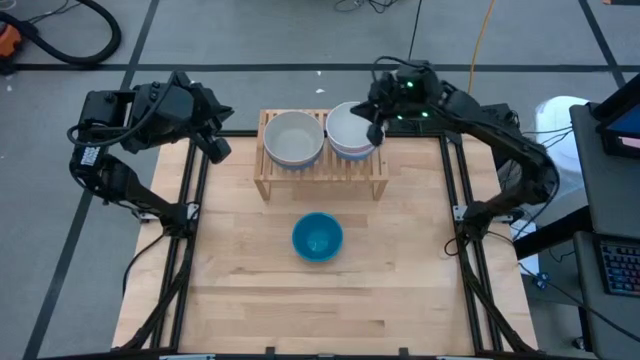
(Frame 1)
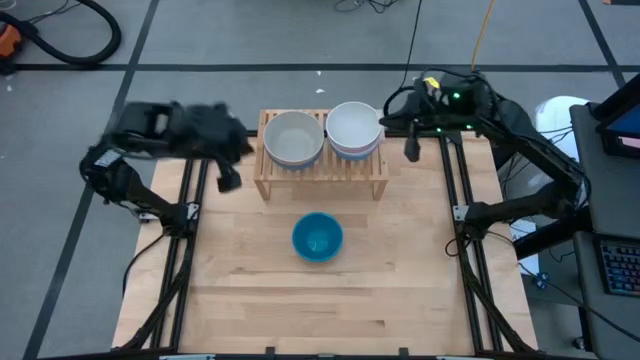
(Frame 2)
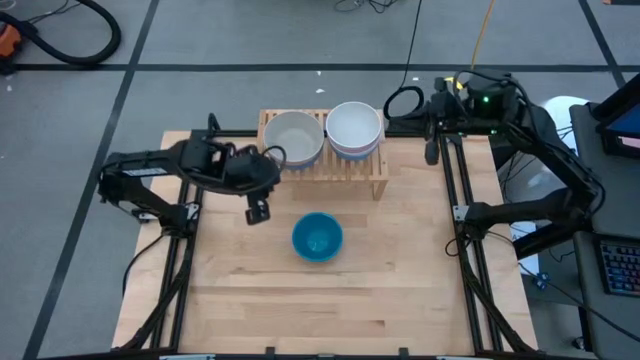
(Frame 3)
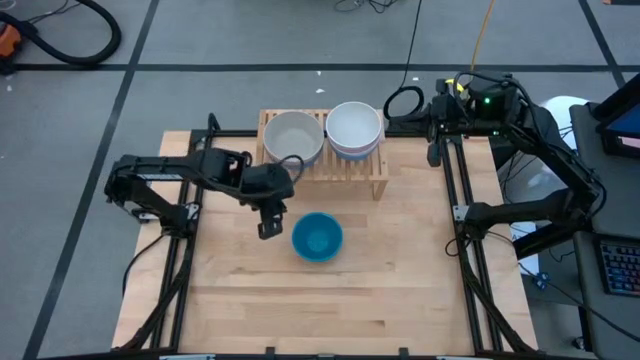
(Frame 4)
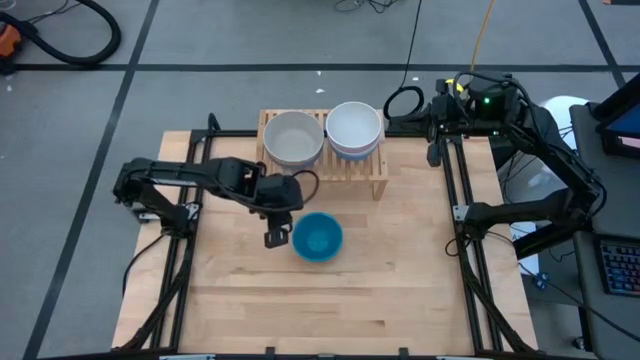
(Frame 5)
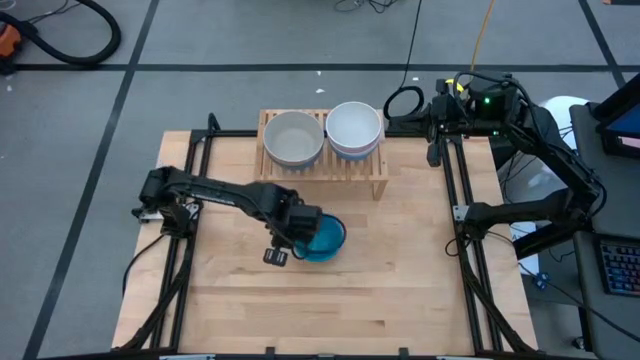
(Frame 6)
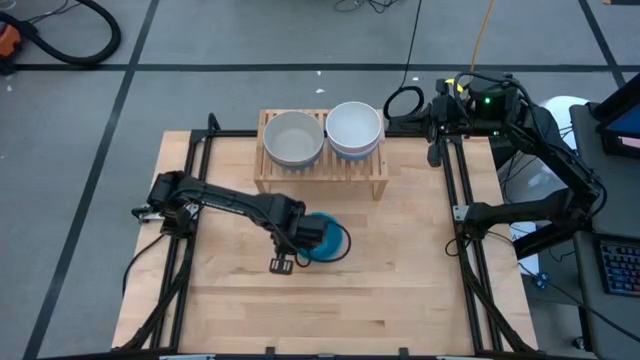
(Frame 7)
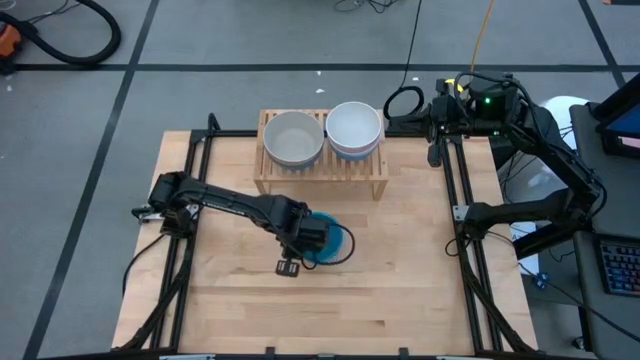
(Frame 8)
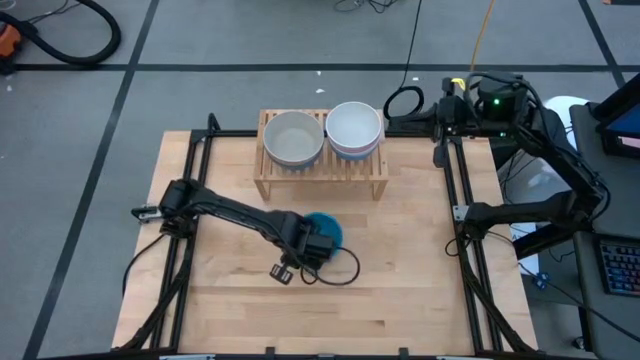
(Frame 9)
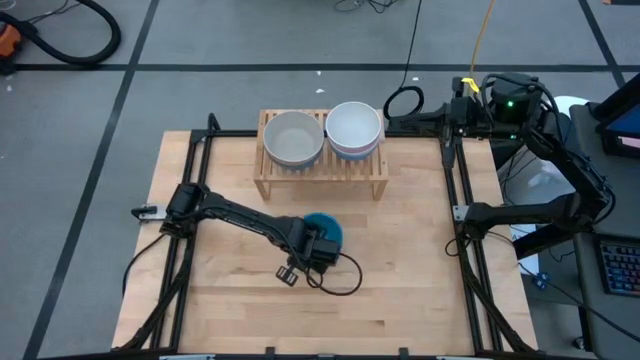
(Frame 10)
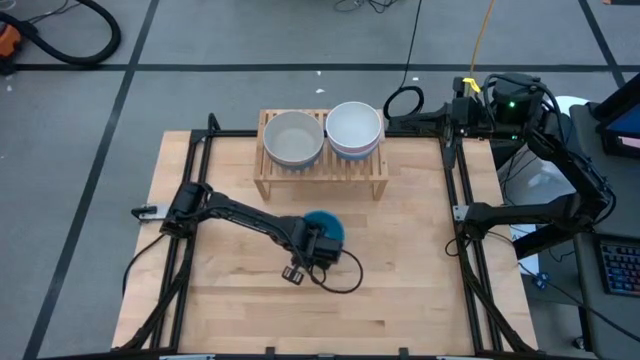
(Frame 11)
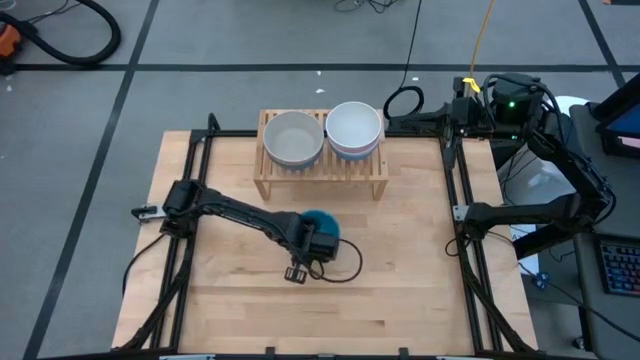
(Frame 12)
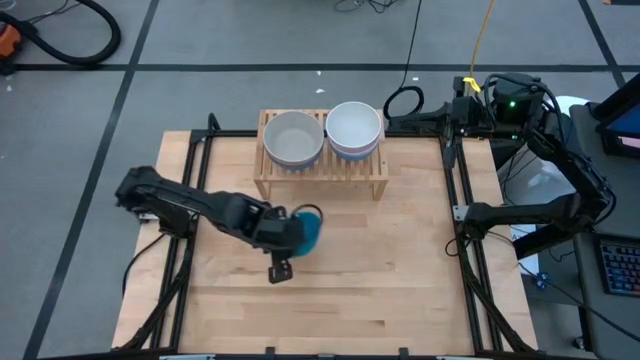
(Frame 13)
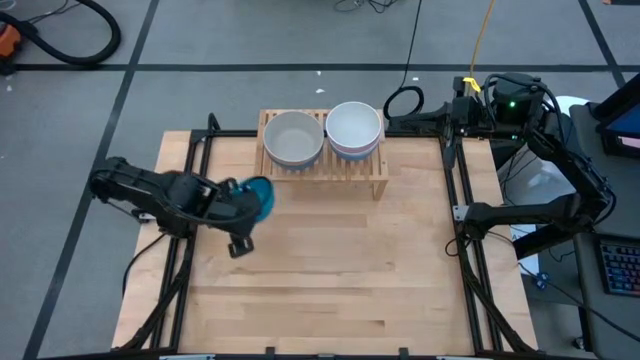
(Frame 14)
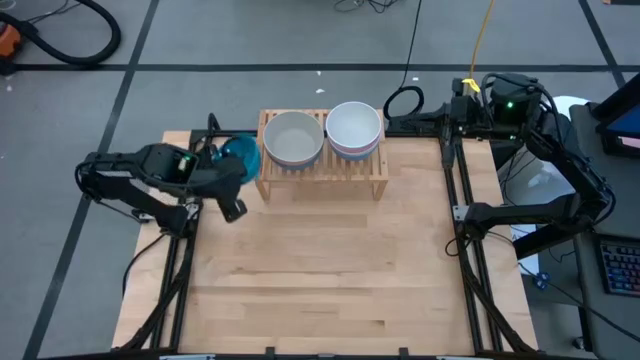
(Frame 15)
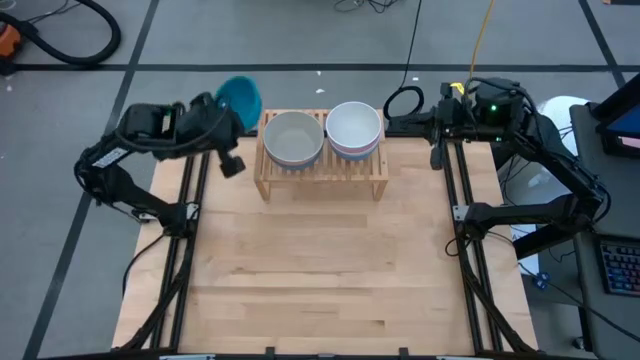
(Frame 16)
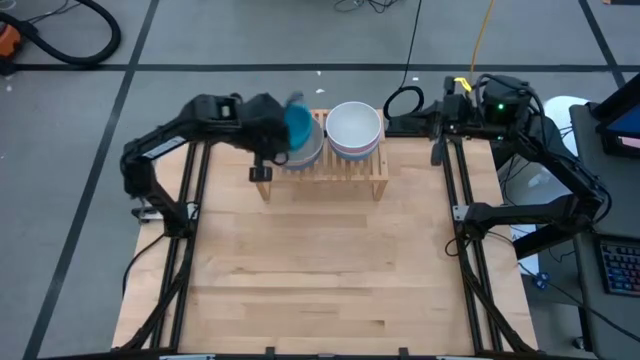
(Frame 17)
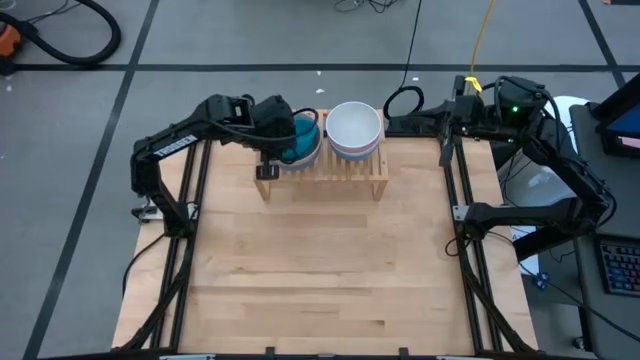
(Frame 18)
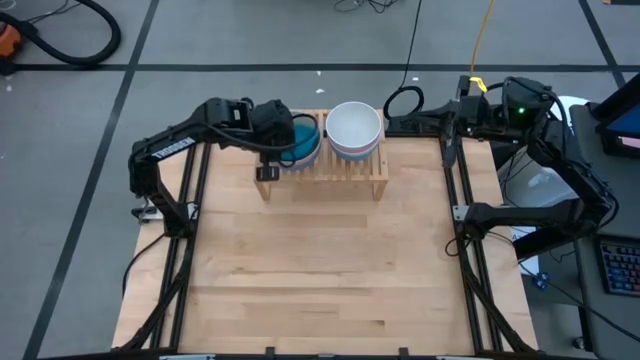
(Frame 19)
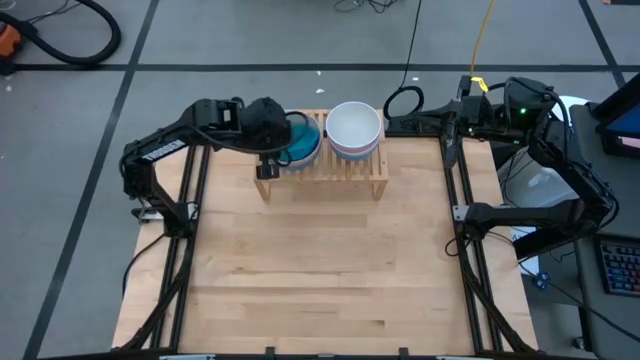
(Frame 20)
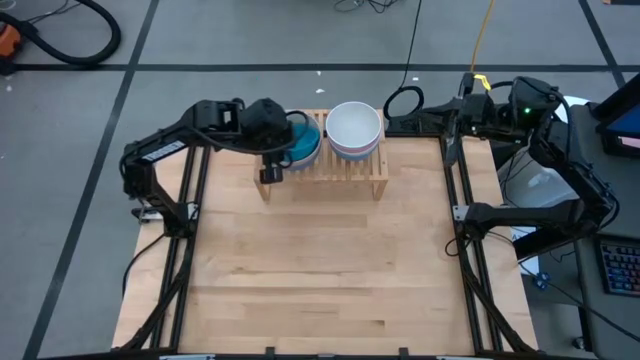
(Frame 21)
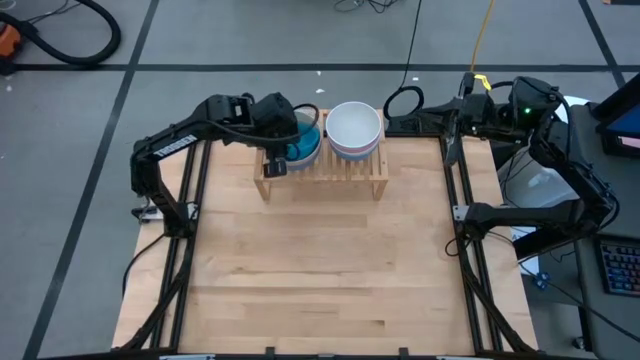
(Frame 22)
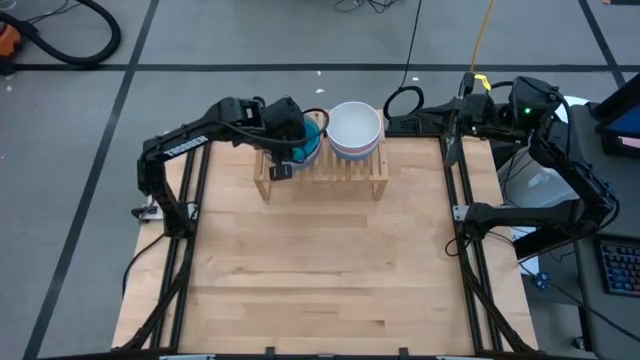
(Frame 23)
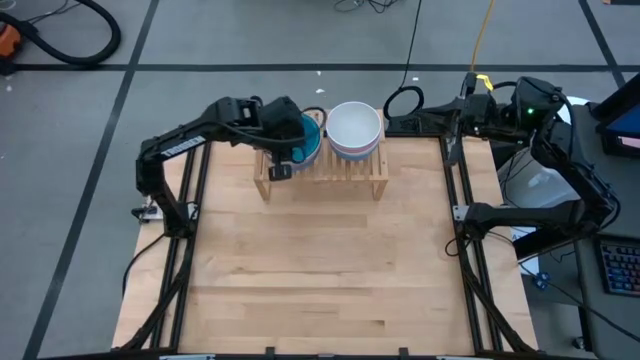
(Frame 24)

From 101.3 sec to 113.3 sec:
Task: Place and stack bowls onto a shelf
Stack the blue bowl on top of the gray bowl on the shelf

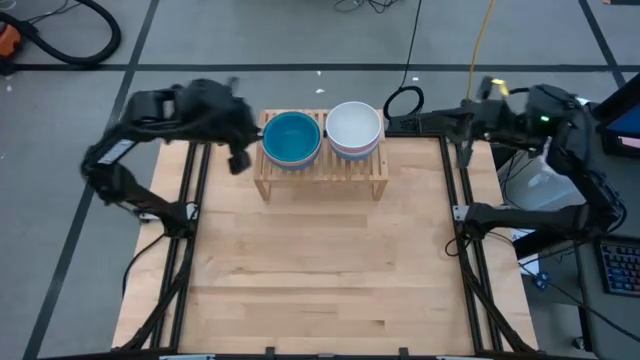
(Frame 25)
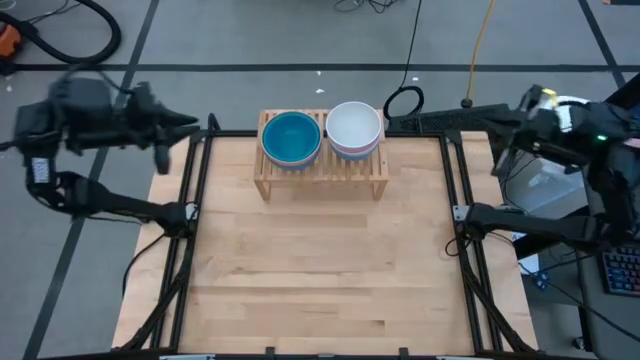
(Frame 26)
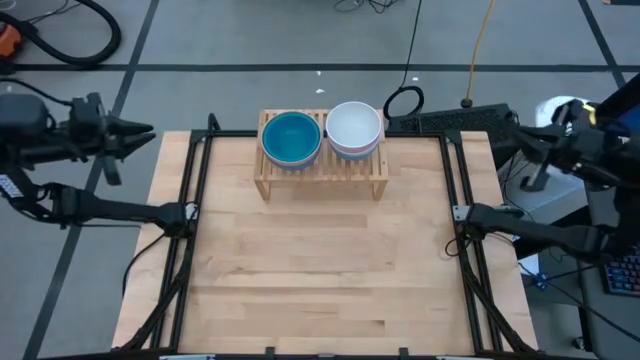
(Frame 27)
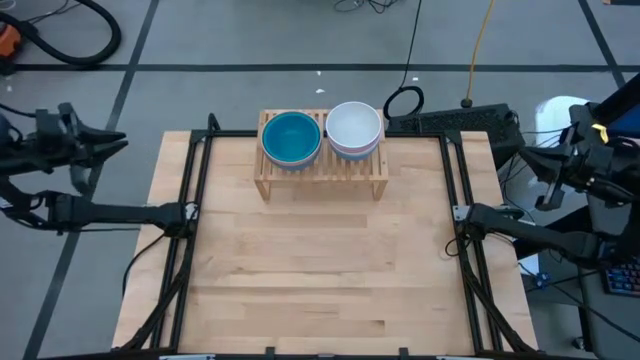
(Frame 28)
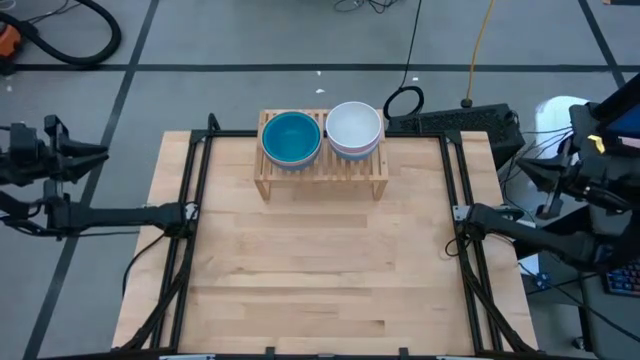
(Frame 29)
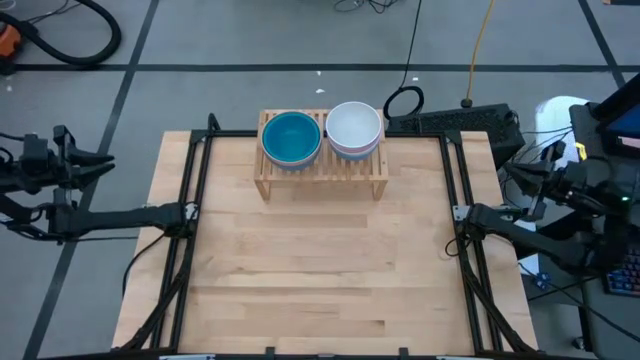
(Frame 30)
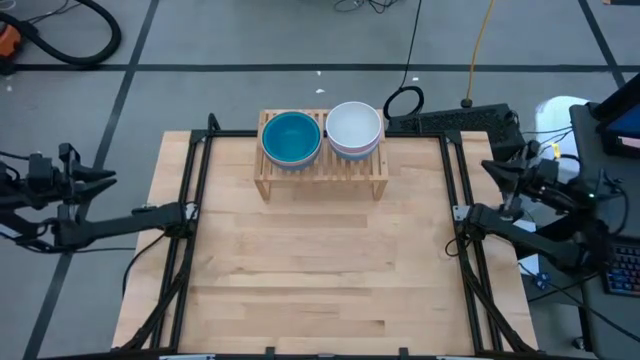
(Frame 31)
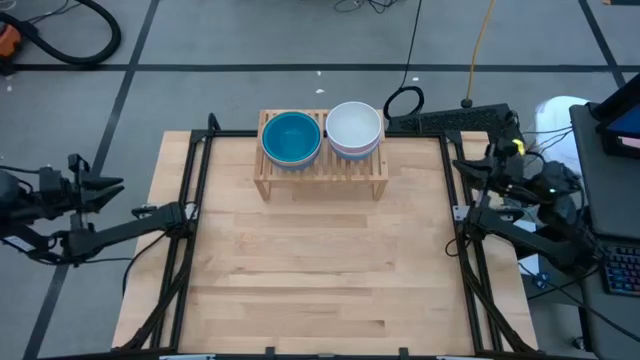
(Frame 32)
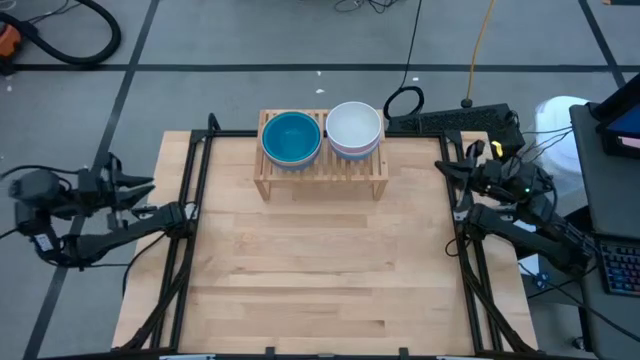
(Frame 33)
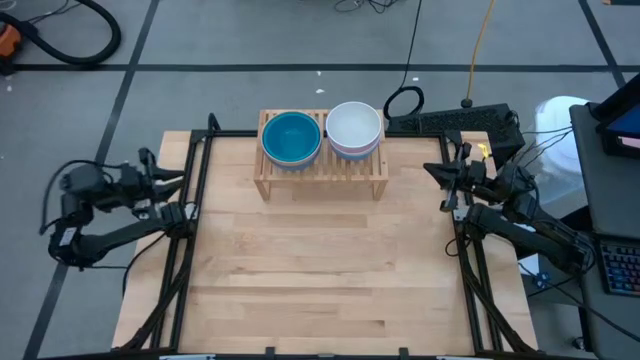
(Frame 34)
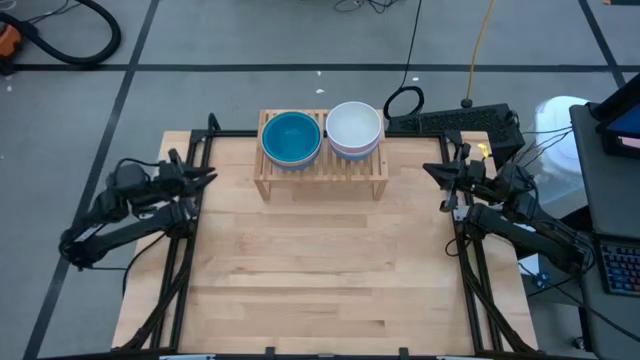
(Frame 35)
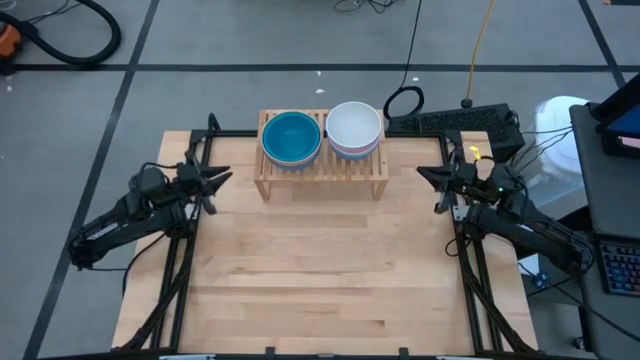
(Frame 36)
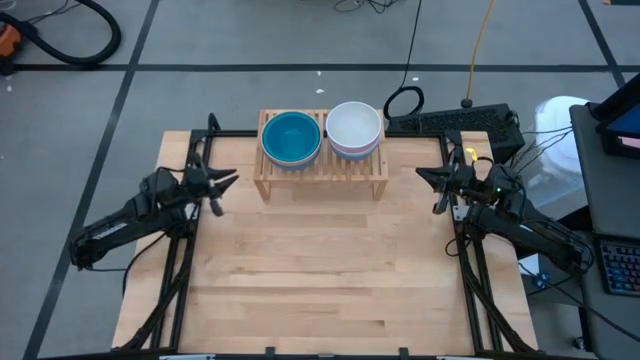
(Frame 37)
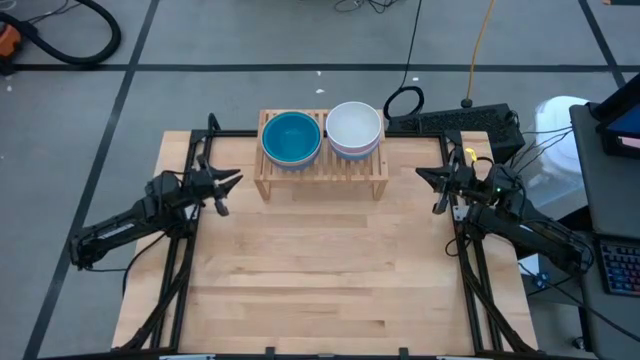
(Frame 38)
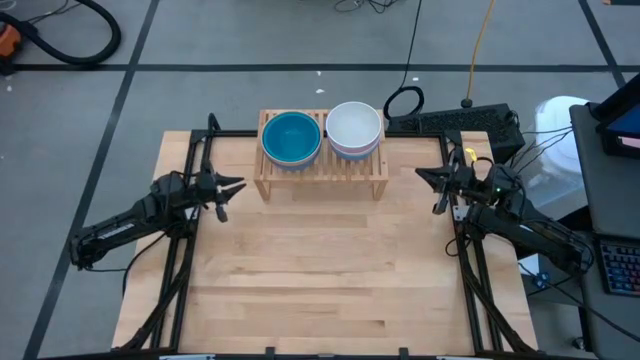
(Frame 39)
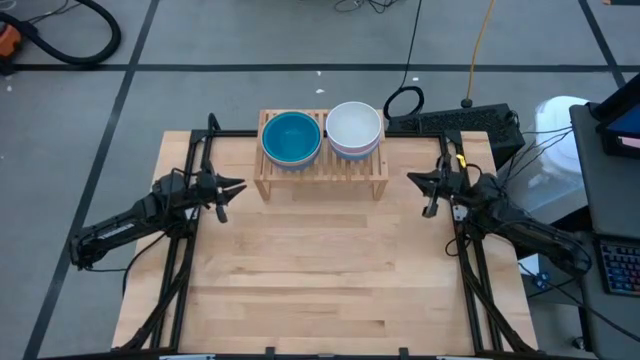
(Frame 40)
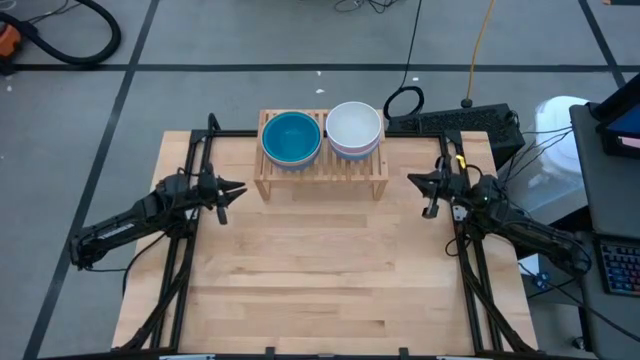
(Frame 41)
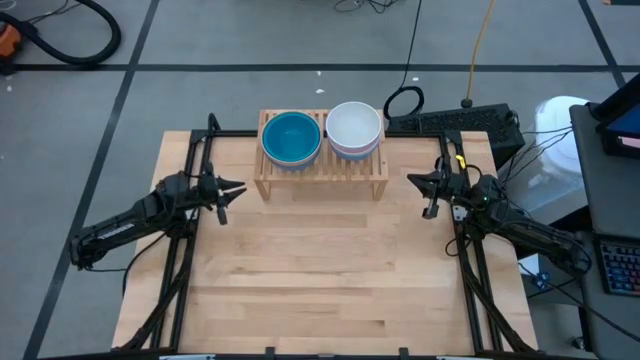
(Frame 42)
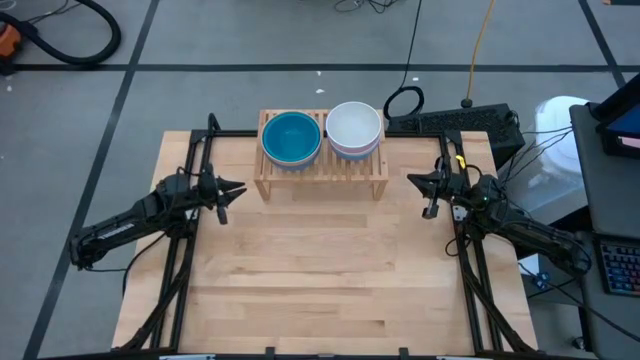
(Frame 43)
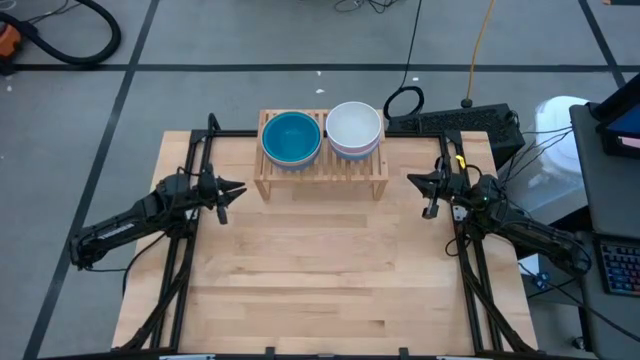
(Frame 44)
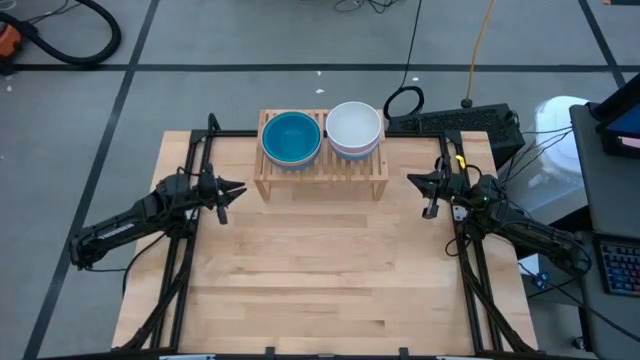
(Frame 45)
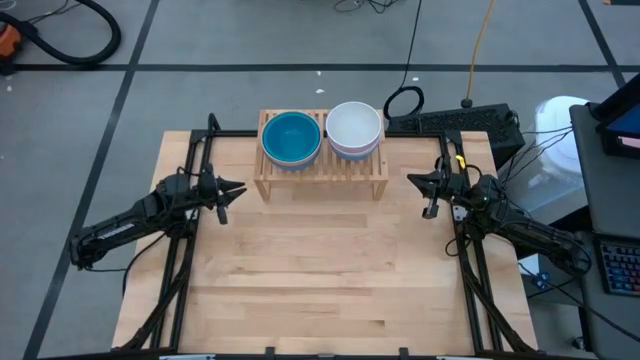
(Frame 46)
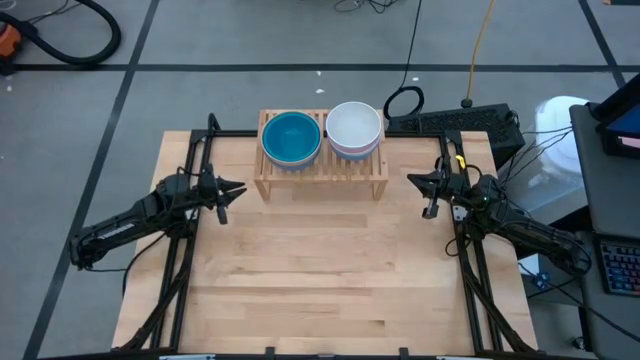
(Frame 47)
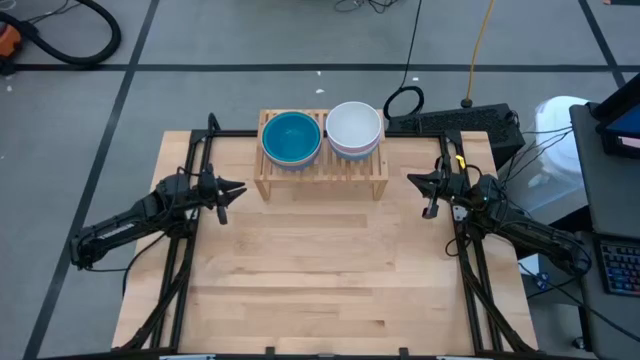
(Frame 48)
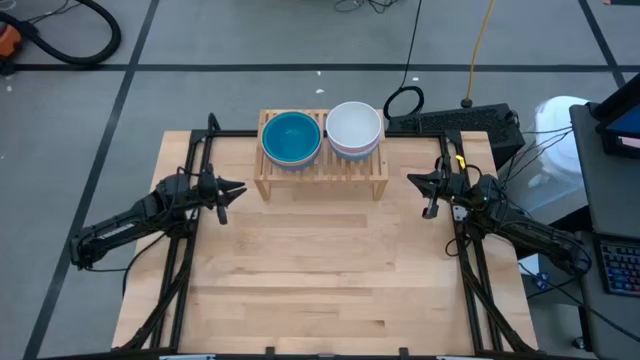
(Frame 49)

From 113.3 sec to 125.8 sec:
Return to Home Position
